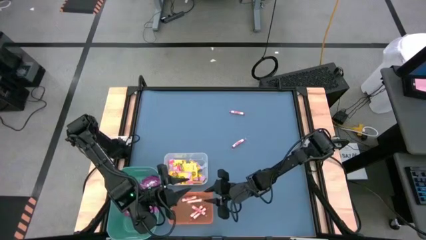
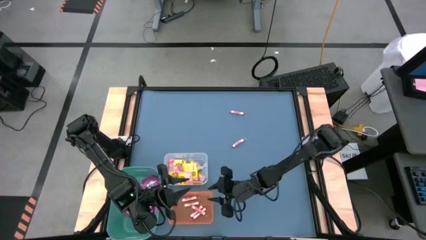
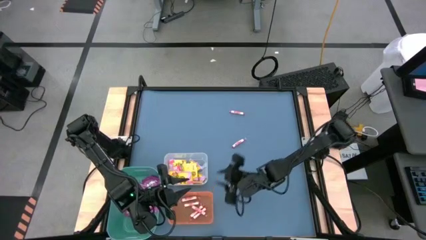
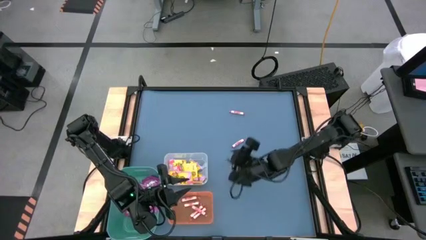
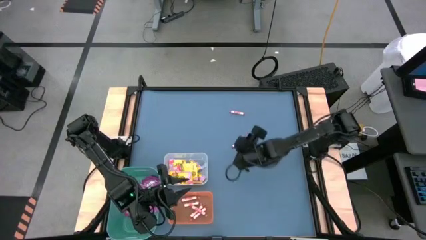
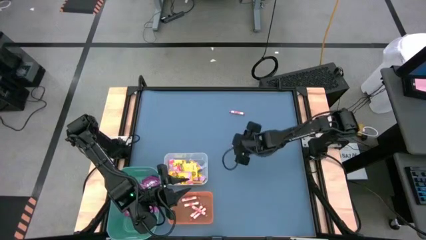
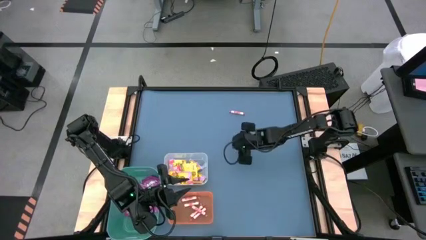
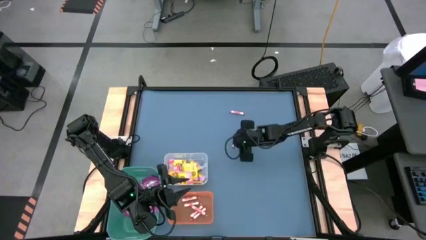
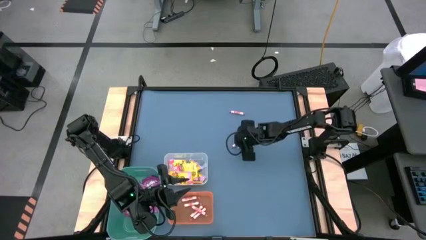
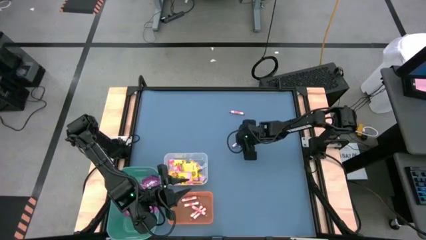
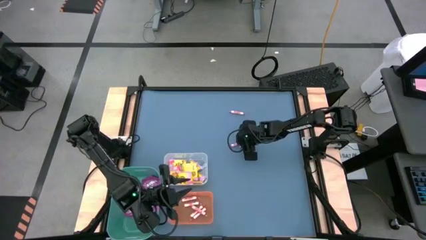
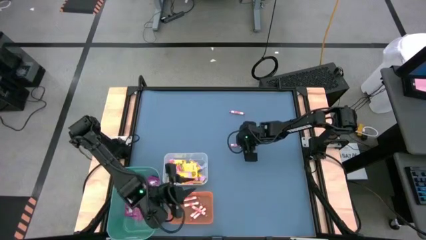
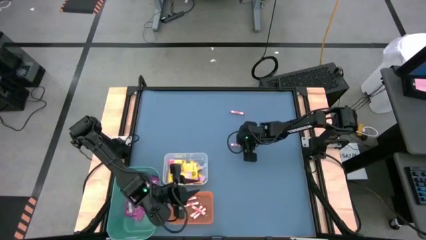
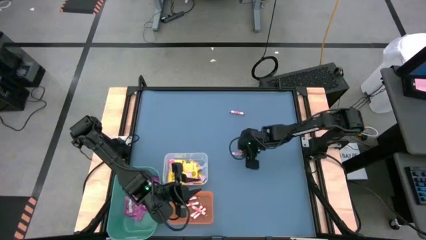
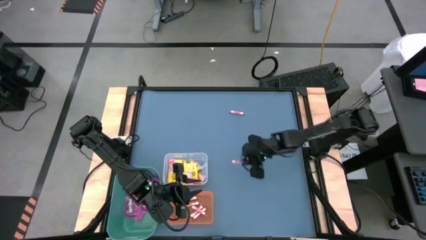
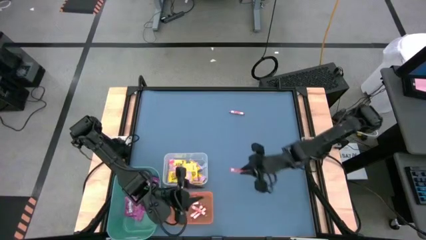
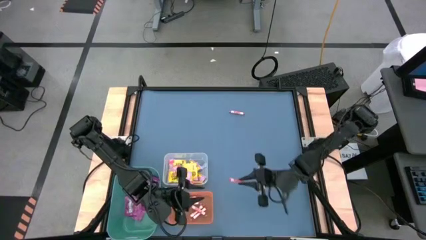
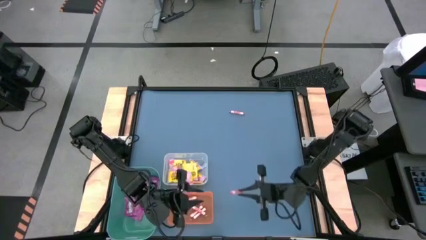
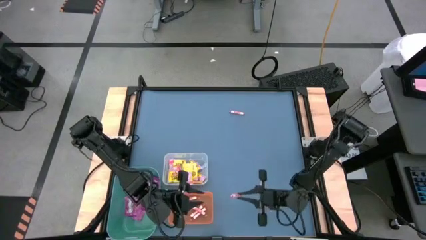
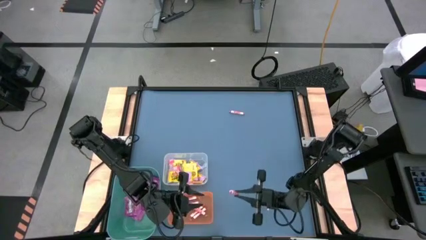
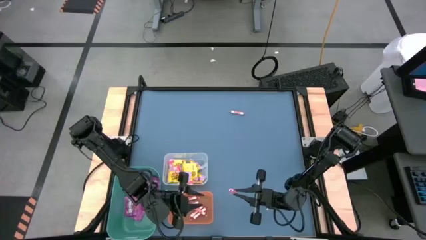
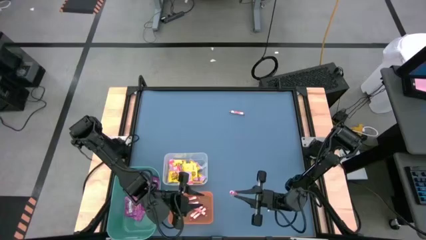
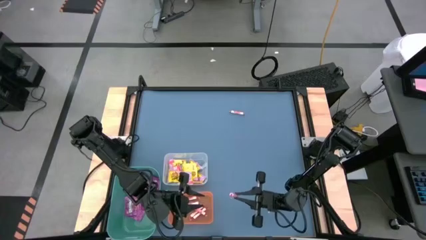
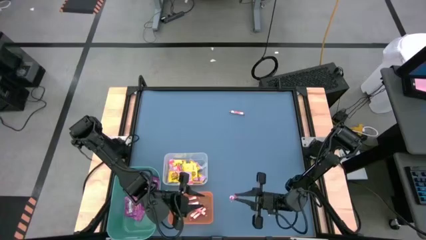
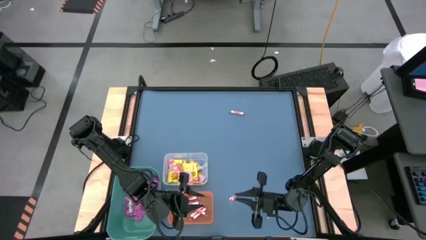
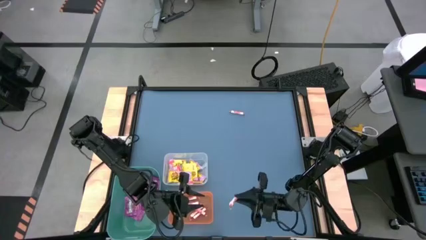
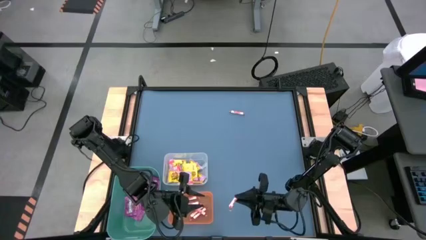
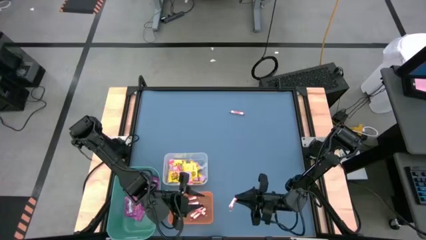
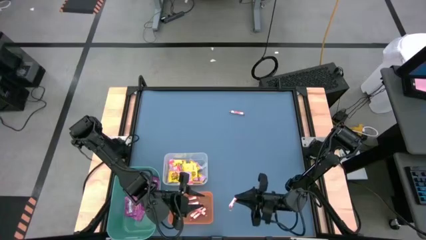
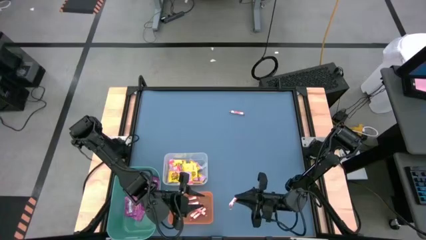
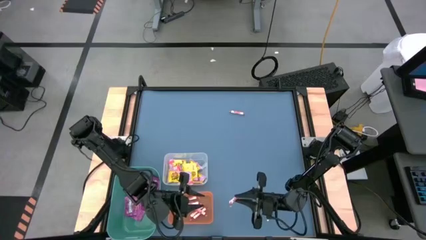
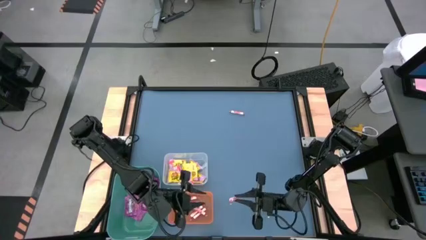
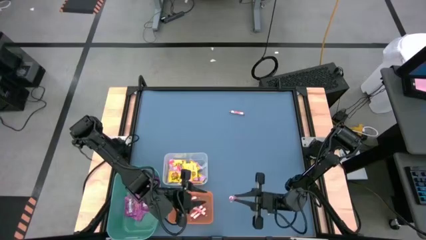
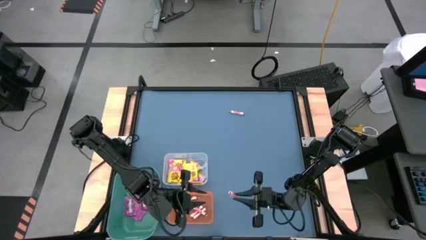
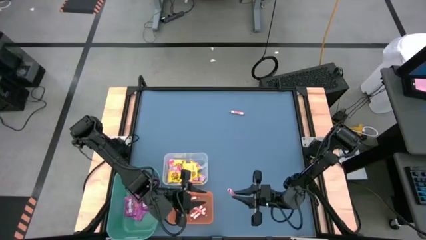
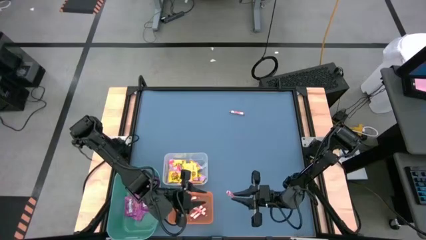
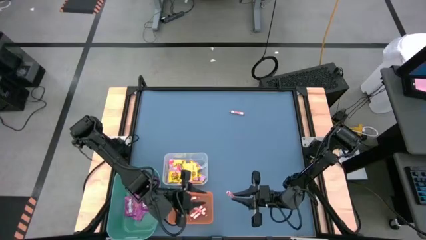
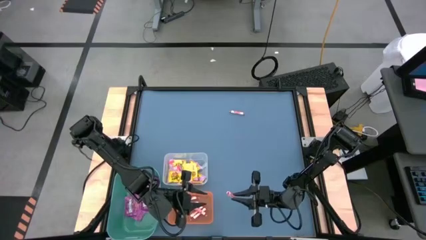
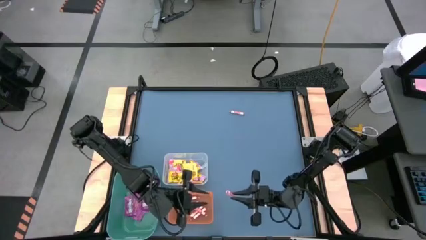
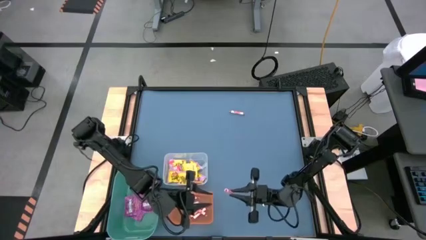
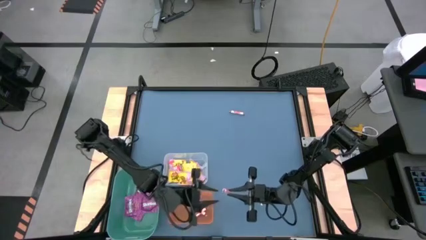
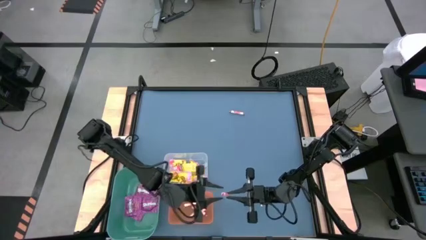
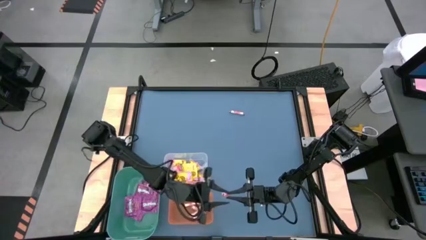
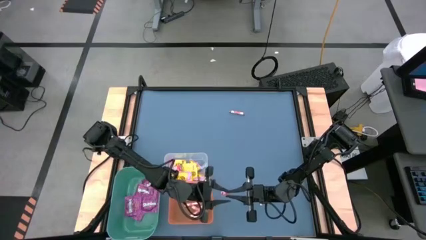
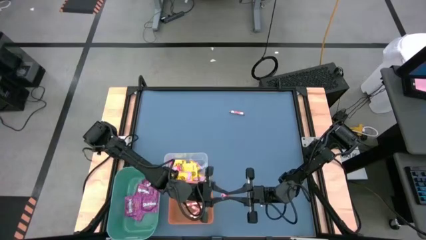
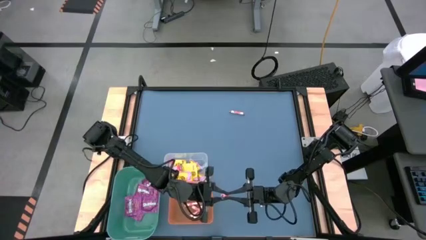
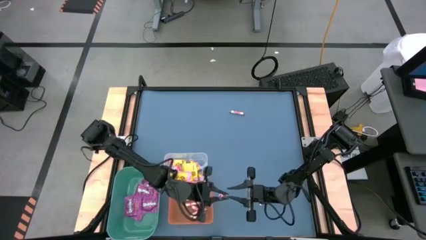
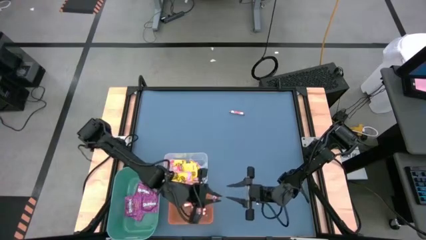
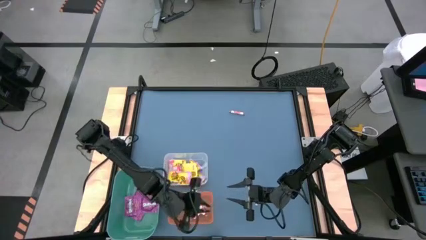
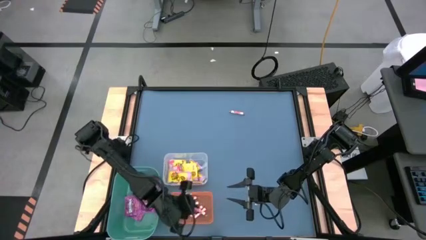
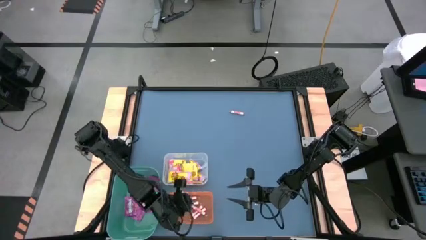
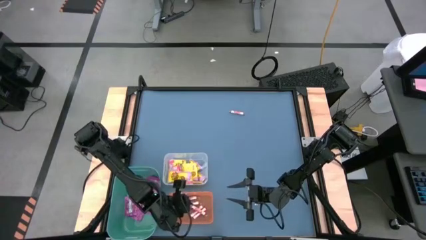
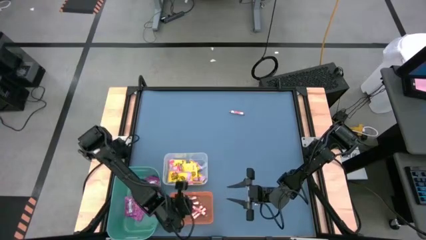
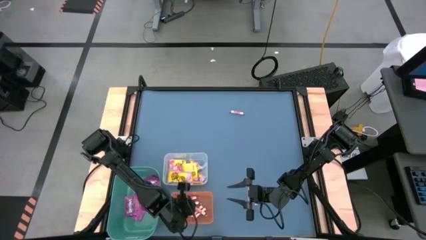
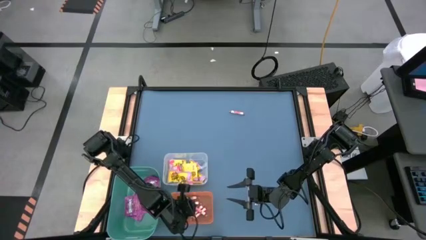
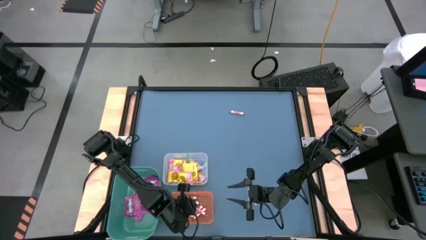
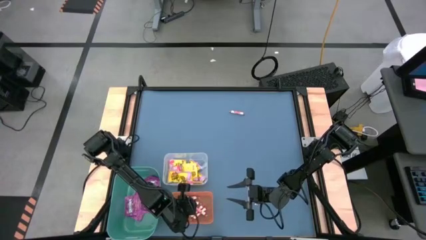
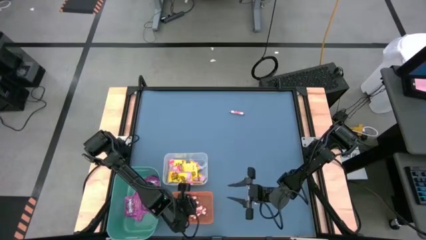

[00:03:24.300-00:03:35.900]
Task: Sort candy
Put the red candy into the orange bin
